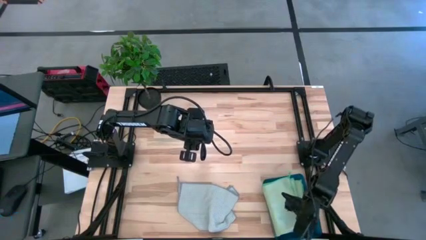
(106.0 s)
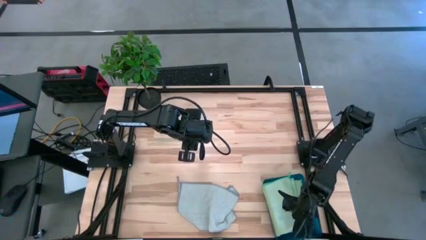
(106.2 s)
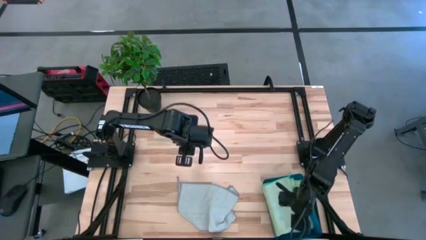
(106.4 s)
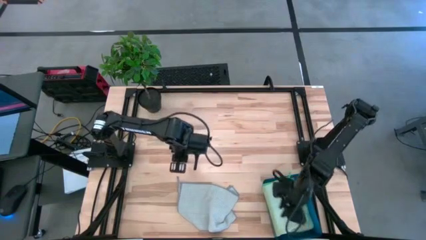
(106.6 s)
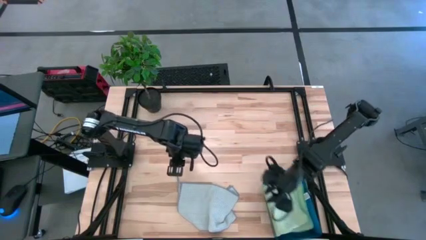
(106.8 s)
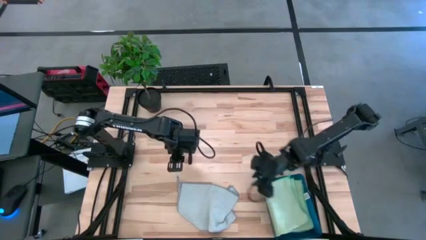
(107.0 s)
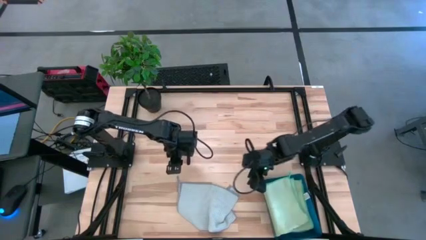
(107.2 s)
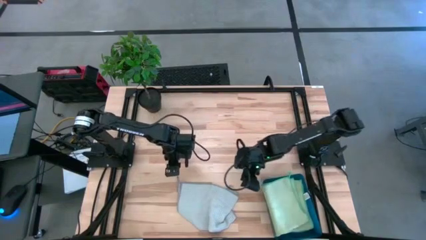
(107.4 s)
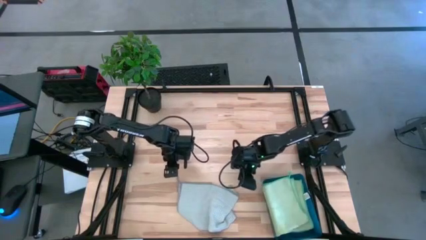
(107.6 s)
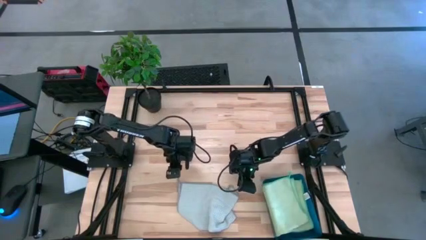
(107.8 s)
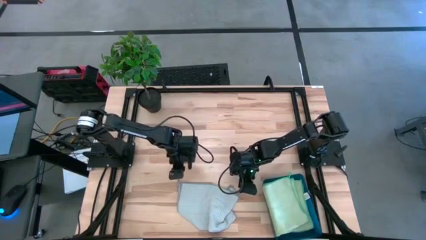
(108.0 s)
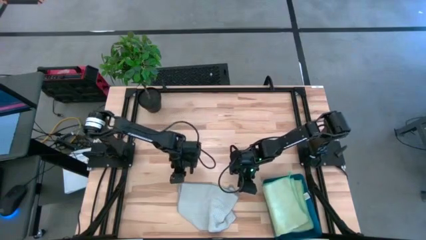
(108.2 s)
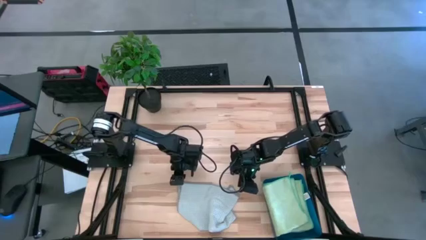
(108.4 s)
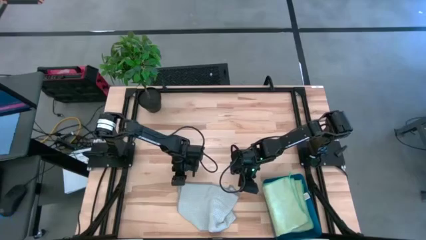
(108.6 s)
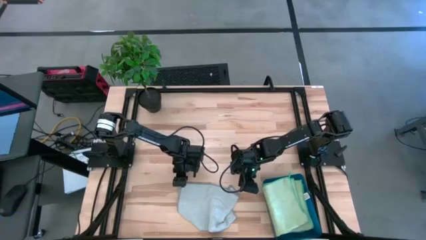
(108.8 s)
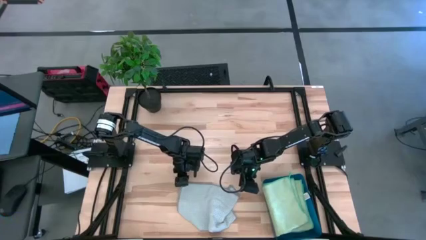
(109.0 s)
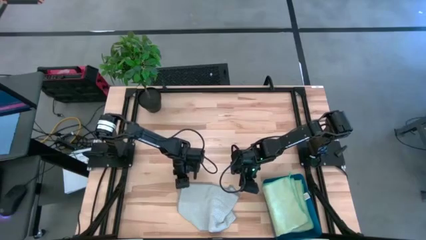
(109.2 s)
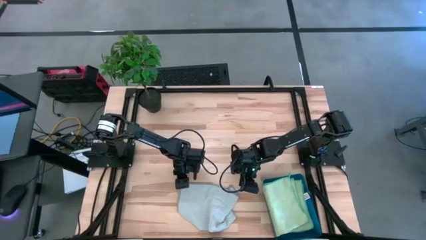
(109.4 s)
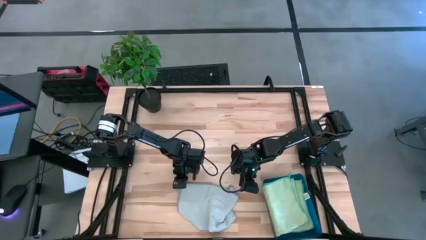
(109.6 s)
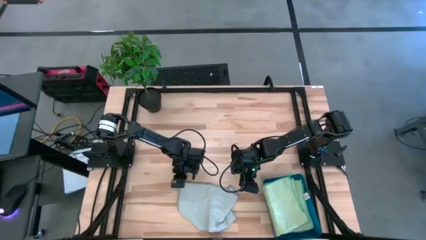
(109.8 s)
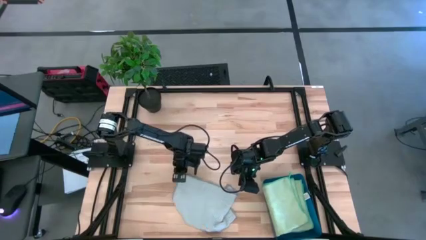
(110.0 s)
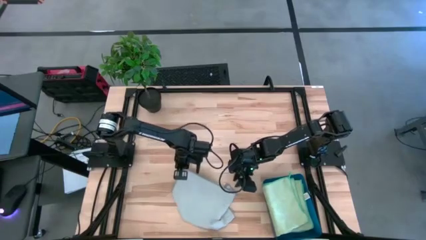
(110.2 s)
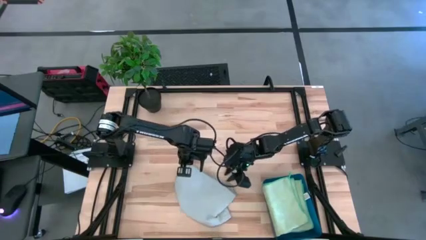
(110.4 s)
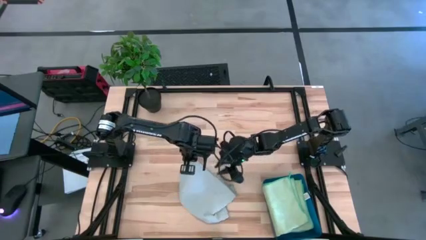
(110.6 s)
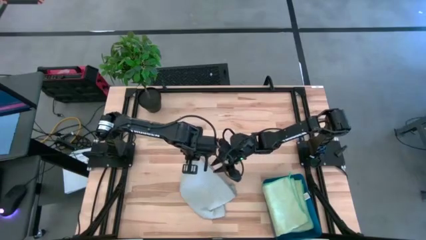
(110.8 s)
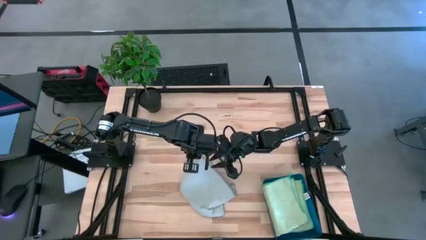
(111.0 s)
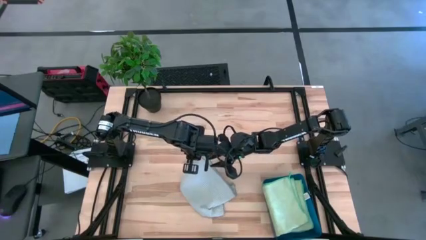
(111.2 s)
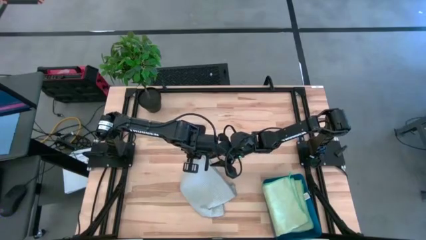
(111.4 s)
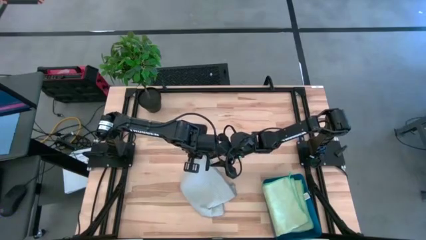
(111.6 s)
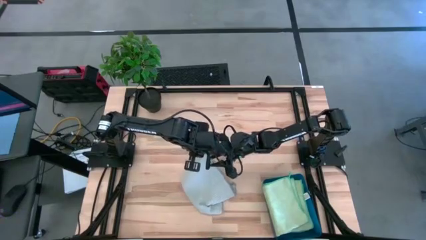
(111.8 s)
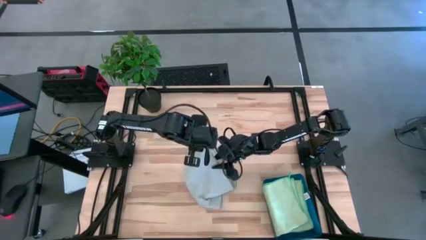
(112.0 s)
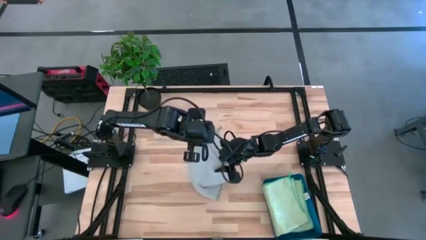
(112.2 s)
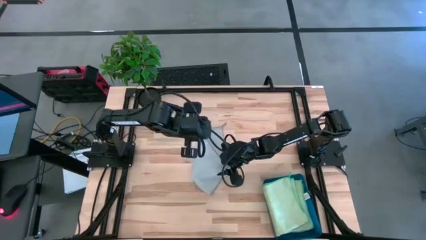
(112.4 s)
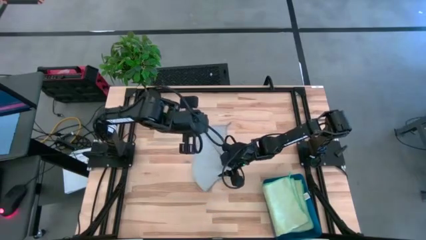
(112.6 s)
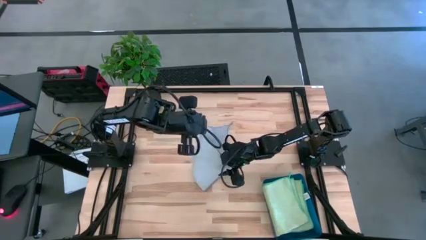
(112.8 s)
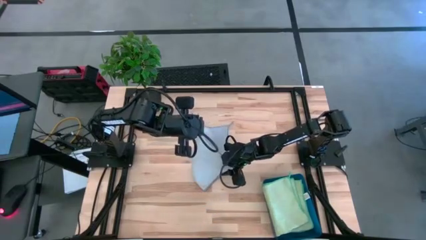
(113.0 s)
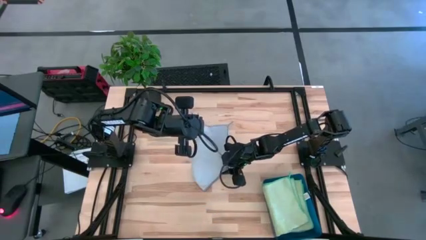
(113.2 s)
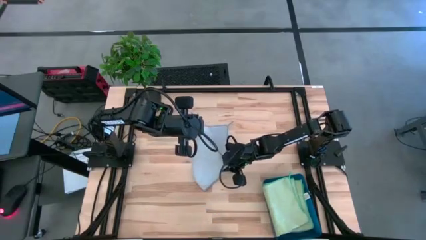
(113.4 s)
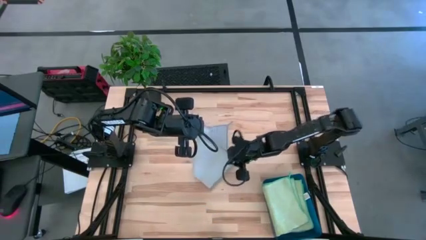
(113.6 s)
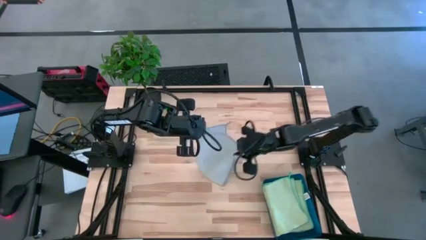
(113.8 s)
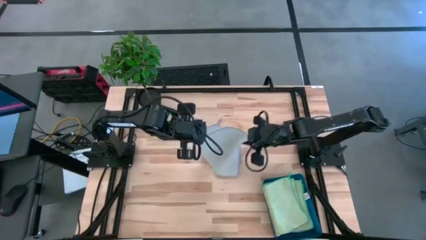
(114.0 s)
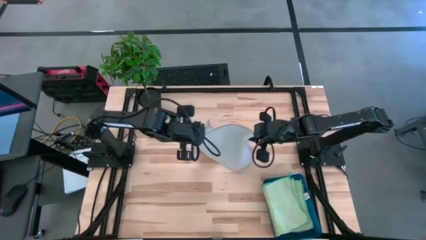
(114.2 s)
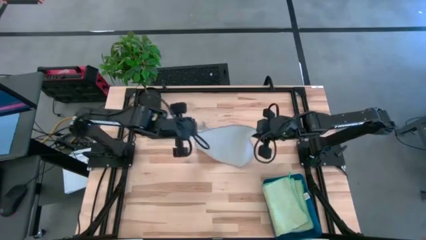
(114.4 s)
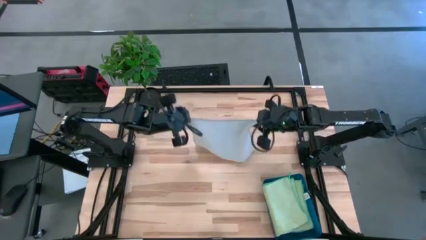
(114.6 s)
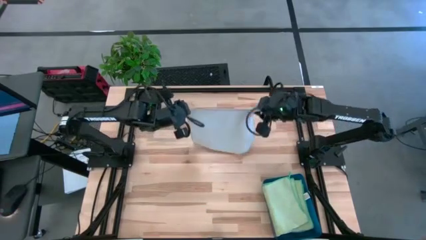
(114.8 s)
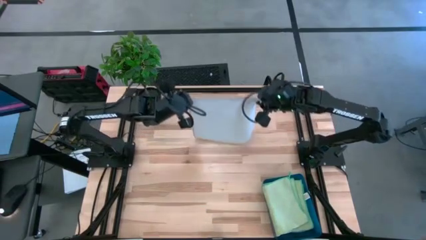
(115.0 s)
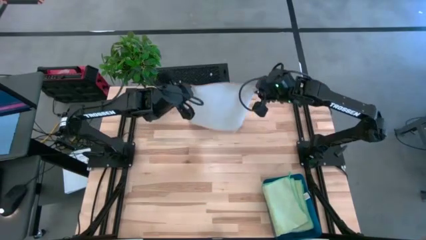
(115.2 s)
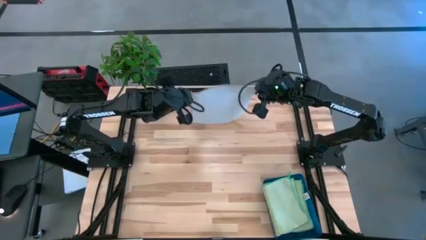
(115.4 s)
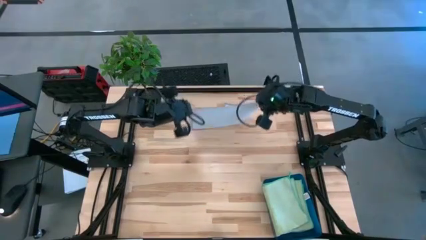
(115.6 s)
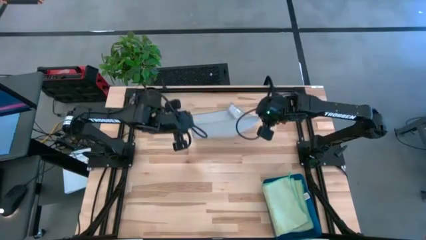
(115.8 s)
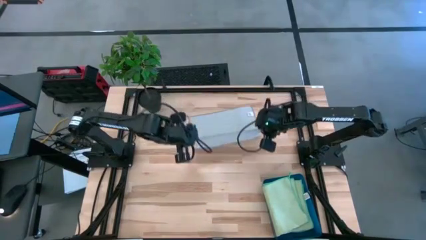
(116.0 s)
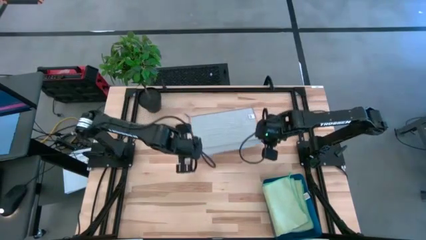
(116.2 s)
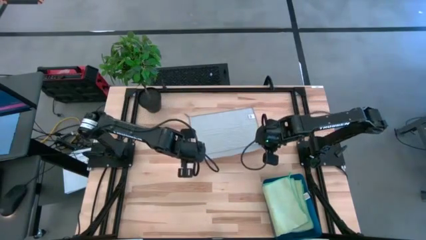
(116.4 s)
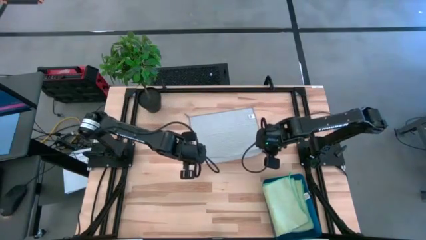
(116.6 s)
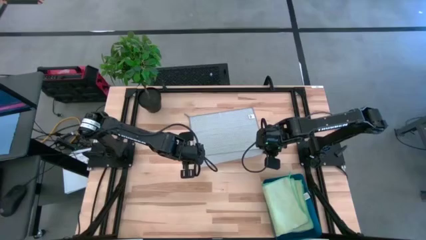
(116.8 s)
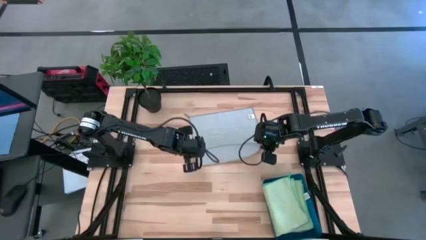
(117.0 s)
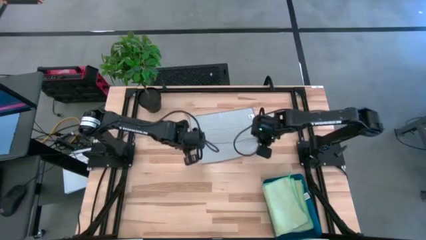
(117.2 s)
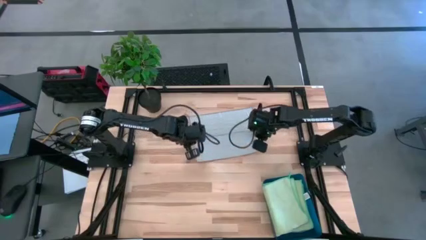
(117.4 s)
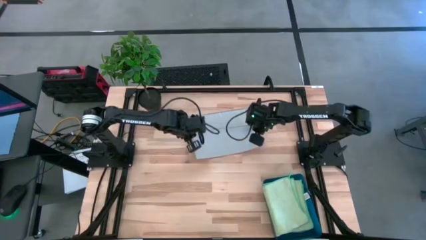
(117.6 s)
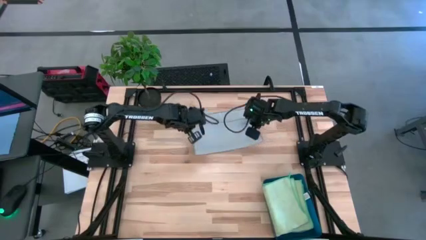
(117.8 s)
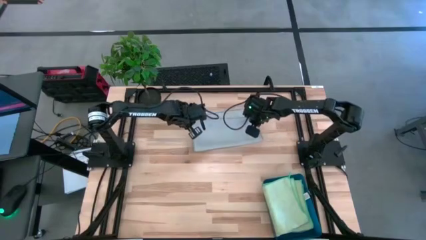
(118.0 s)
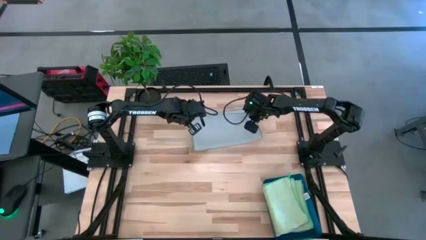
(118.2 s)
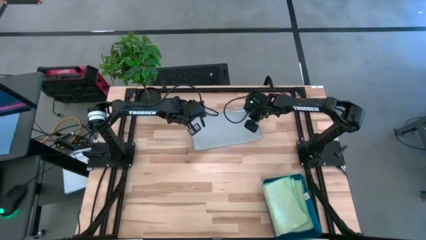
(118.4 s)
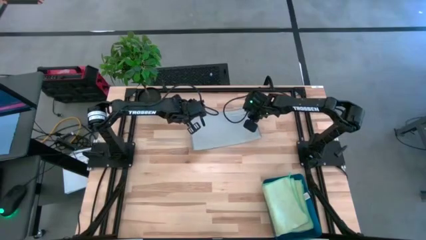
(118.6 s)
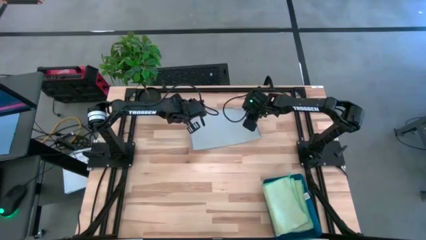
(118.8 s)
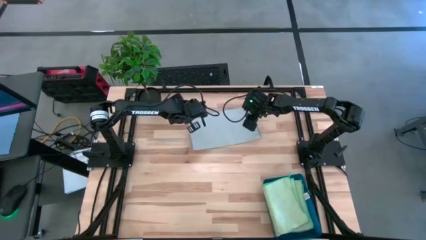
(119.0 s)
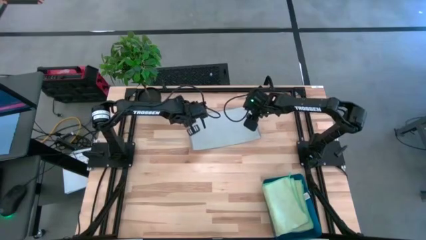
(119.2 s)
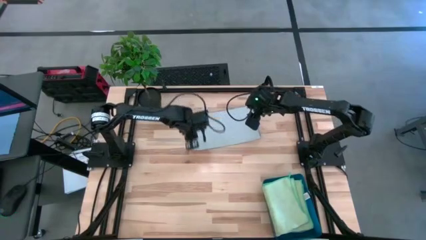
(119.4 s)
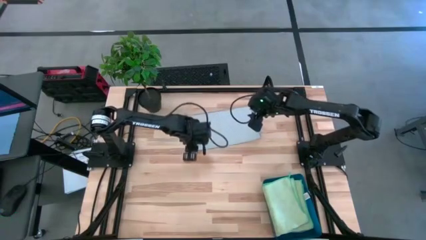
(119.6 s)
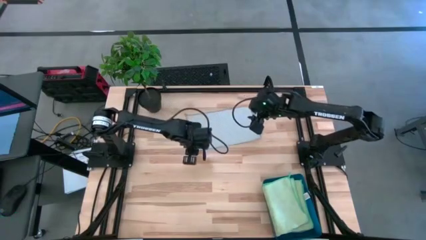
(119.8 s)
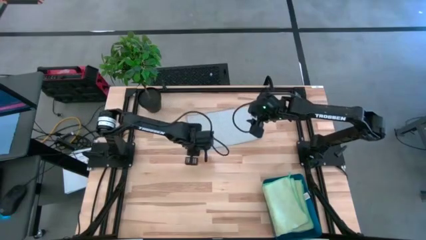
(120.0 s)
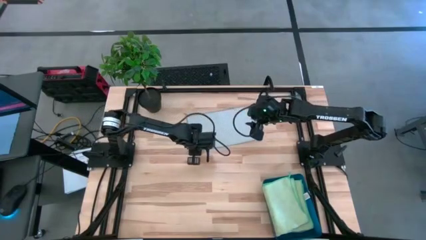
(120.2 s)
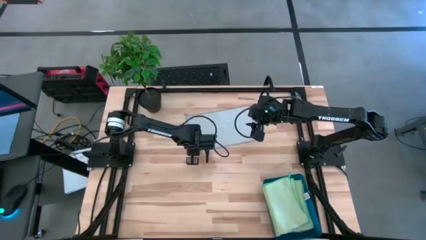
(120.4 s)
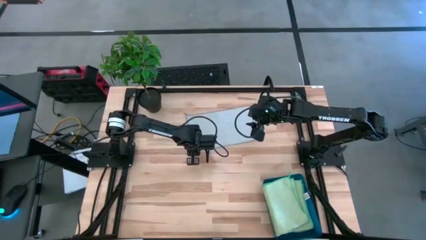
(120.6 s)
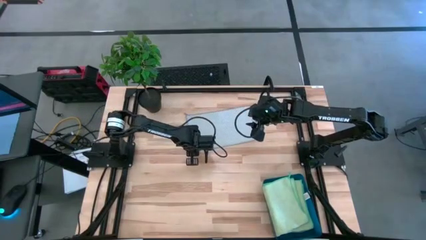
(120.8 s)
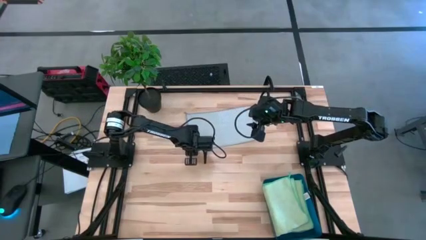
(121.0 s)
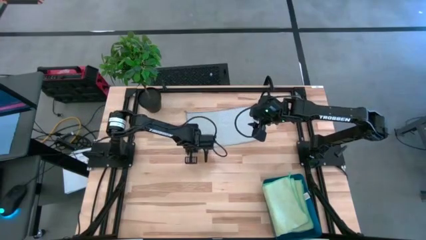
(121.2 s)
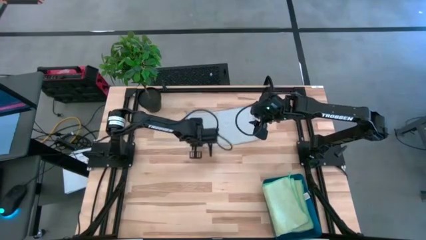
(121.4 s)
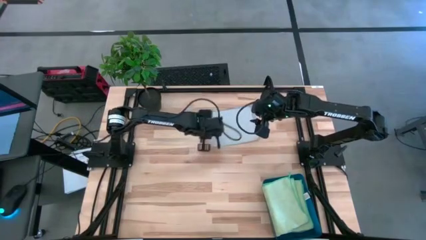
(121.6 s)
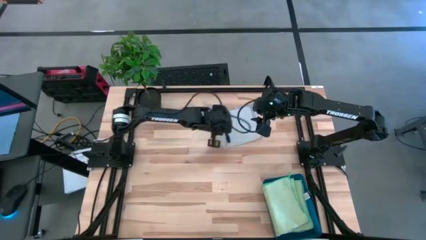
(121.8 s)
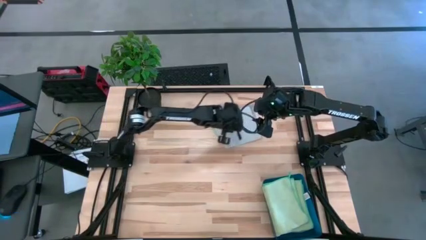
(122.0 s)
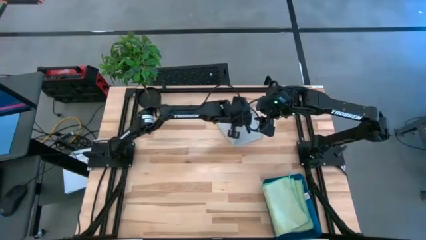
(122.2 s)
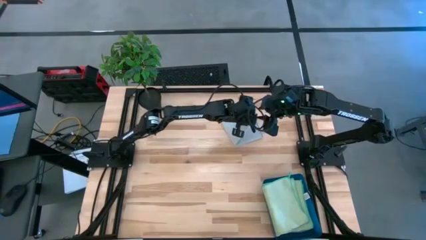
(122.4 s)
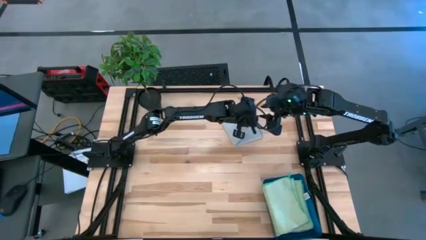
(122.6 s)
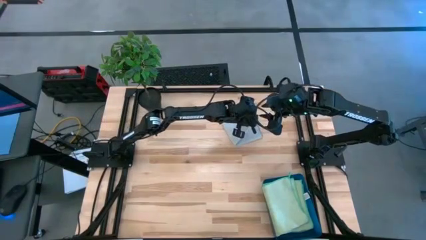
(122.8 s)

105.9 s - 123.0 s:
Task: Fold microfiber towels
Fold the gray microfiber towel
